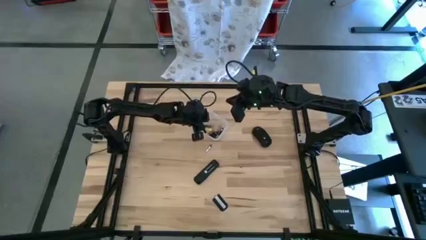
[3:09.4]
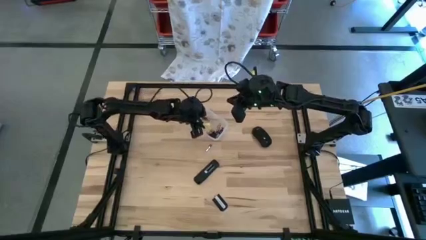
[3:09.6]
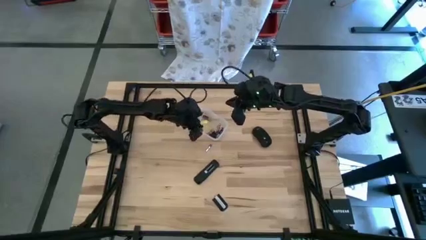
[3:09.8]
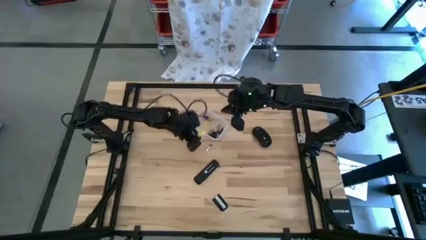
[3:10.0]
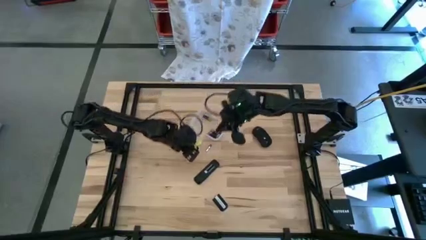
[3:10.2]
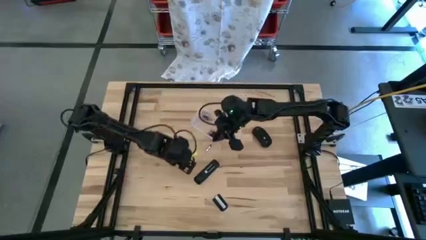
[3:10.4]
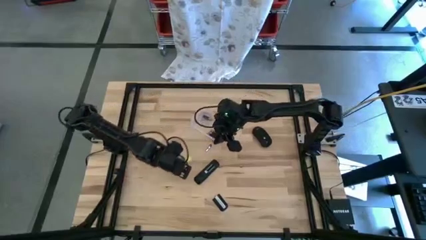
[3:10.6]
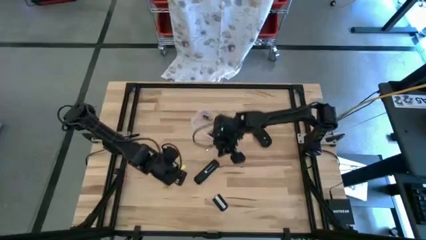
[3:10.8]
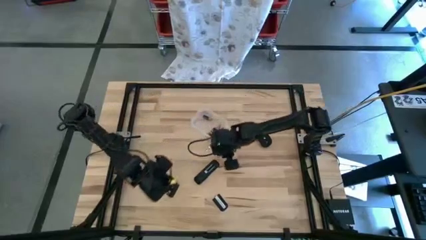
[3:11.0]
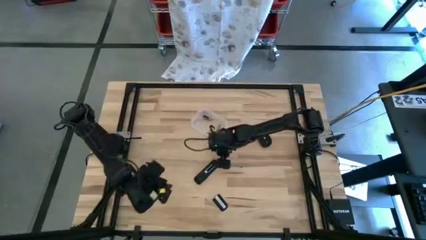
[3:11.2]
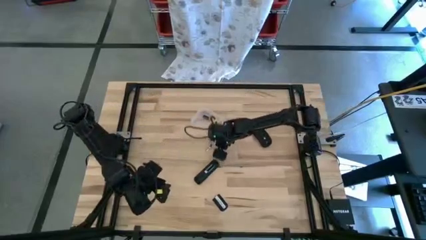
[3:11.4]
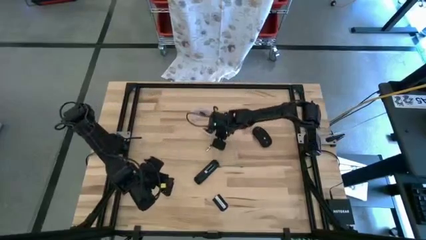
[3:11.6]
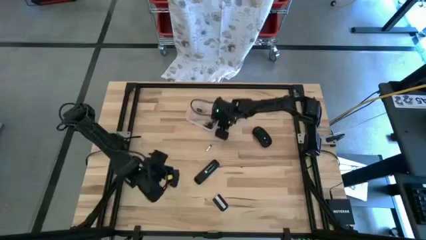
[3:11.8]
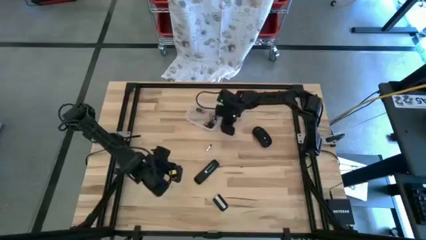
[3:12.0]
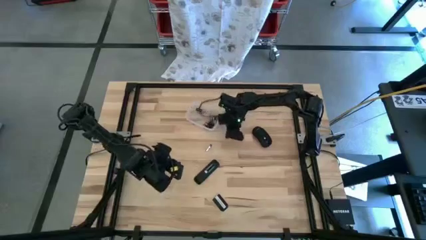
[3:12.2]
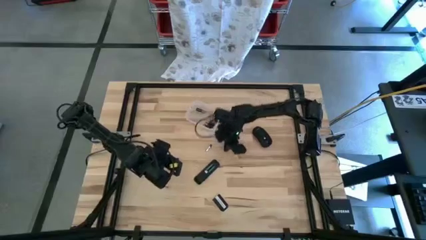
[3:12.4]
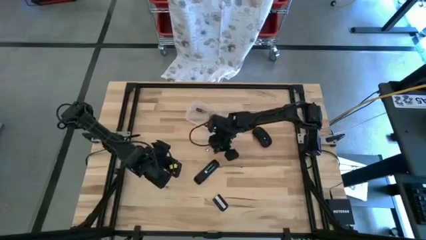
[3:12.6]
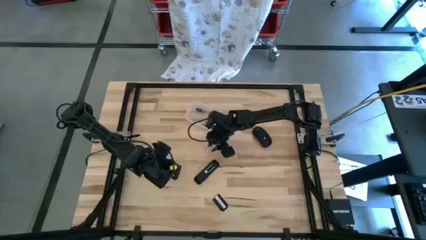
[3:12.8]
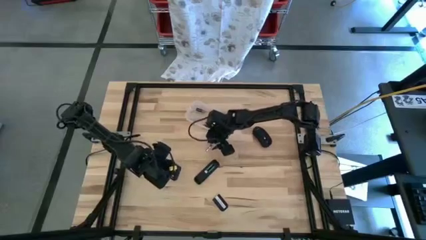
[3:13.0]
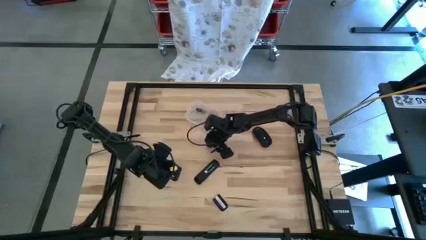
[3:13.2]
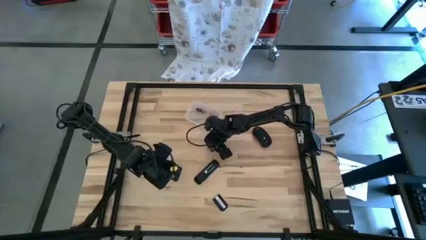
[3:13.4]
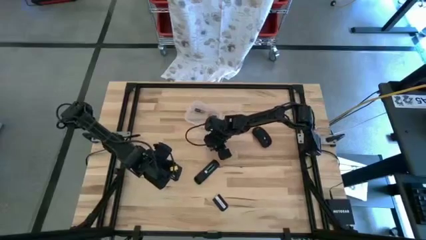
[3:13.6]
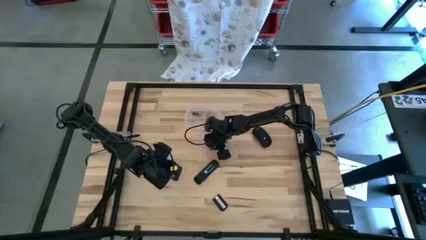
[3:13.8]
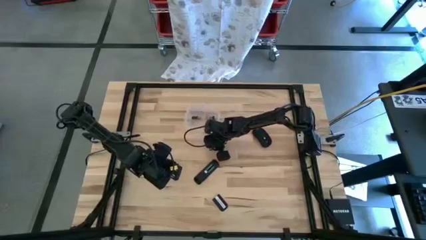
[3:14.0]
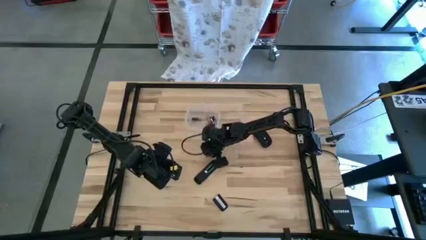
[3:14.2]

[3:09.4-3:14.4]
Task: Insert battery
Insert the small silver battery into the remote

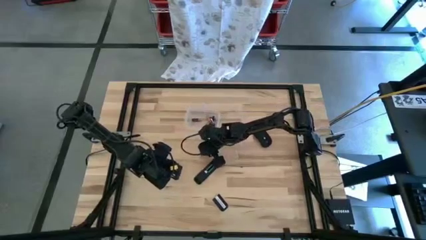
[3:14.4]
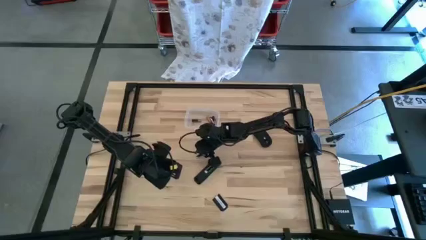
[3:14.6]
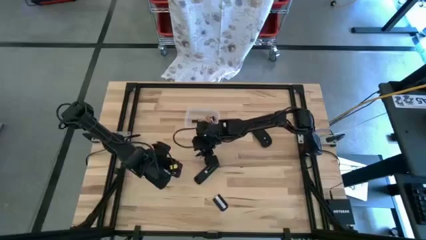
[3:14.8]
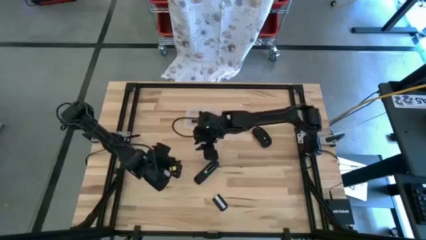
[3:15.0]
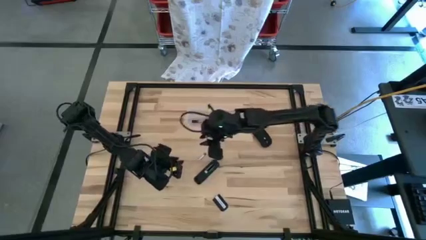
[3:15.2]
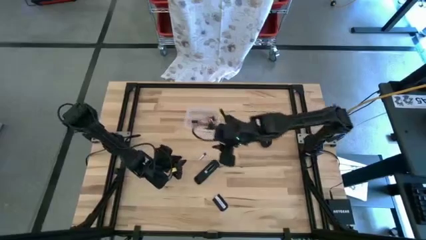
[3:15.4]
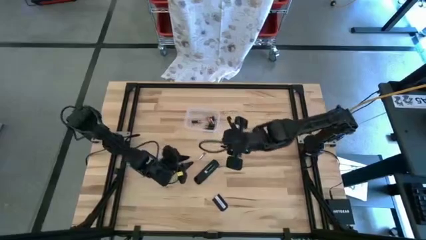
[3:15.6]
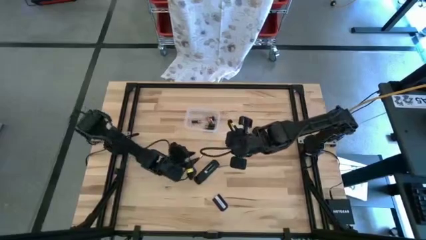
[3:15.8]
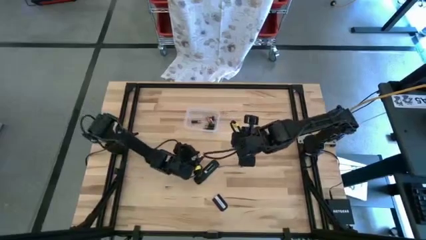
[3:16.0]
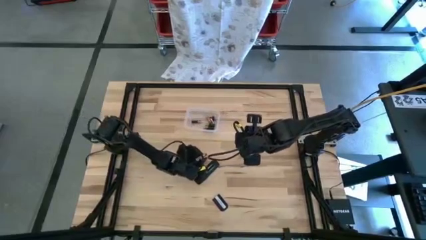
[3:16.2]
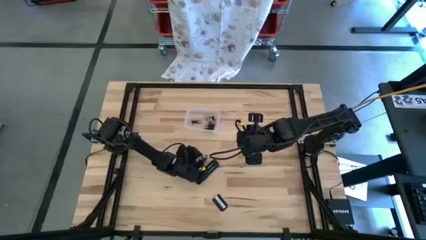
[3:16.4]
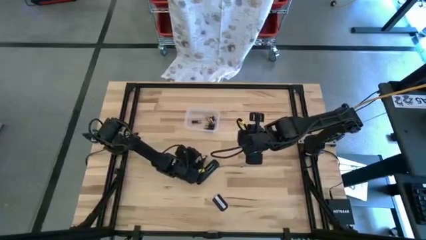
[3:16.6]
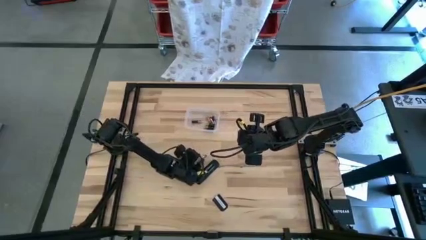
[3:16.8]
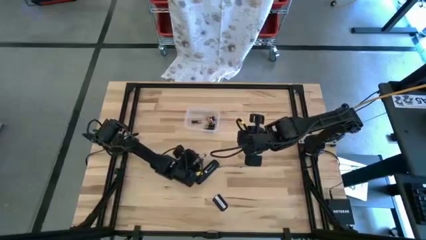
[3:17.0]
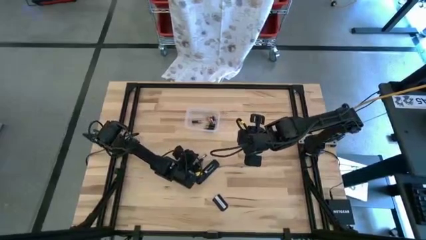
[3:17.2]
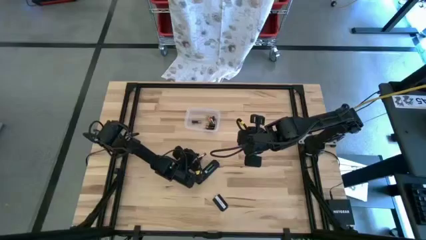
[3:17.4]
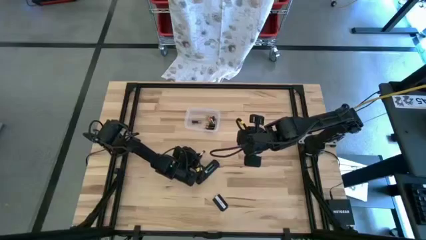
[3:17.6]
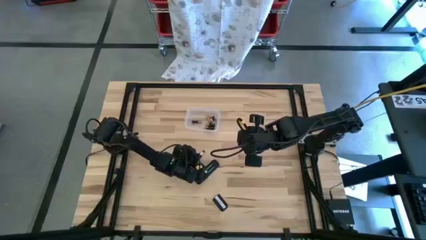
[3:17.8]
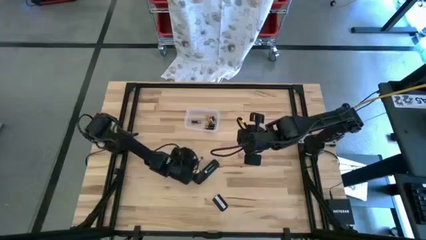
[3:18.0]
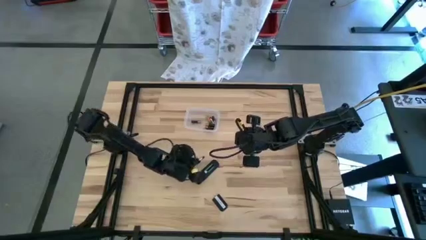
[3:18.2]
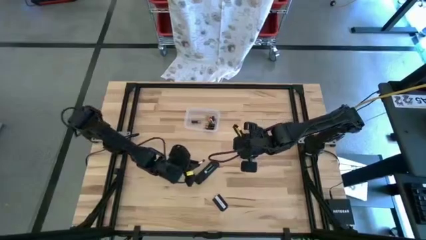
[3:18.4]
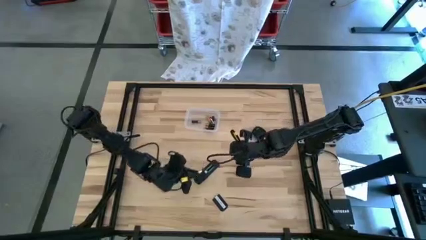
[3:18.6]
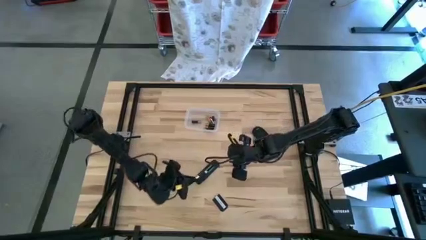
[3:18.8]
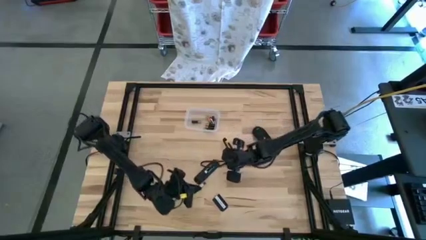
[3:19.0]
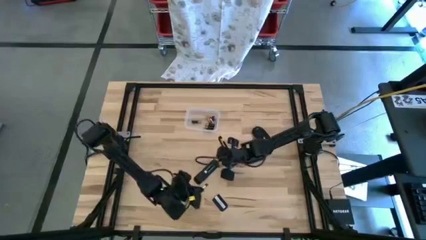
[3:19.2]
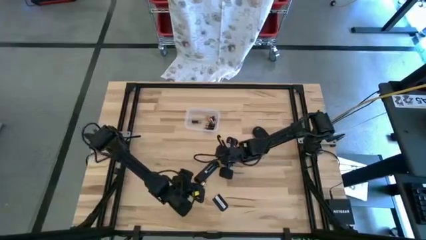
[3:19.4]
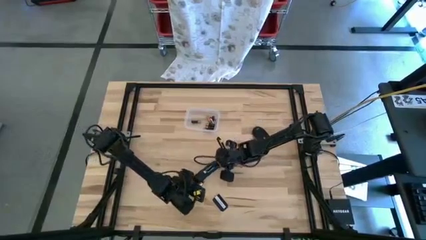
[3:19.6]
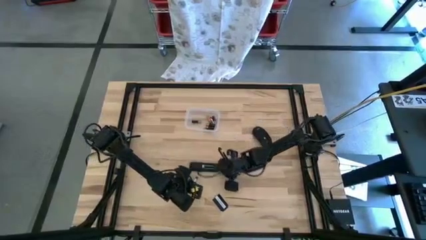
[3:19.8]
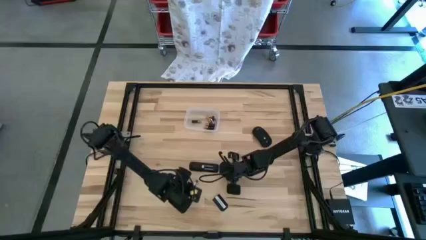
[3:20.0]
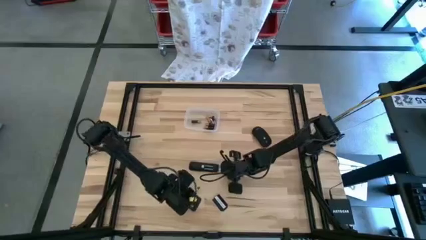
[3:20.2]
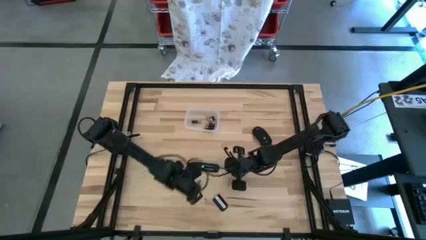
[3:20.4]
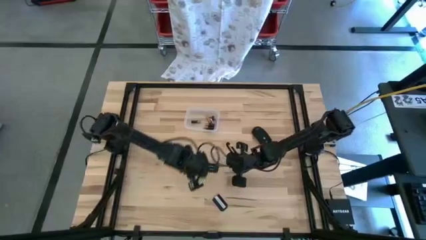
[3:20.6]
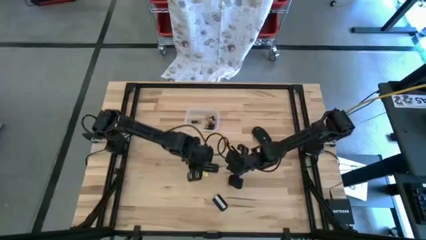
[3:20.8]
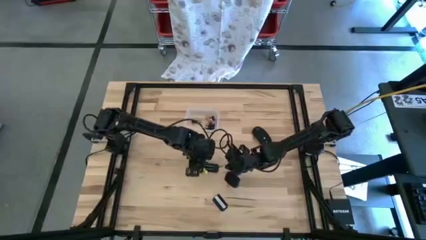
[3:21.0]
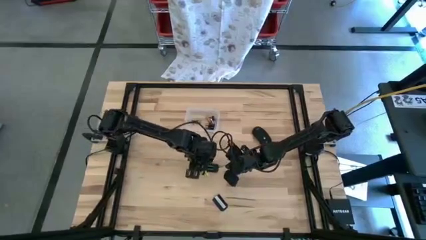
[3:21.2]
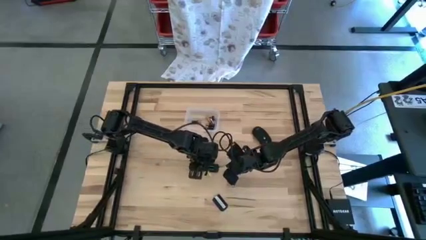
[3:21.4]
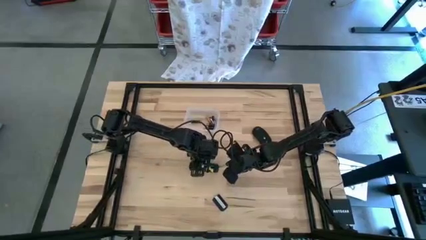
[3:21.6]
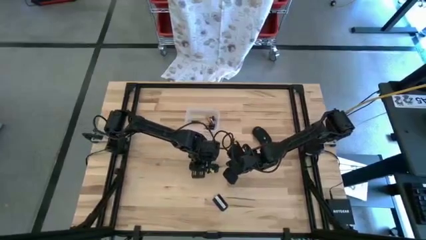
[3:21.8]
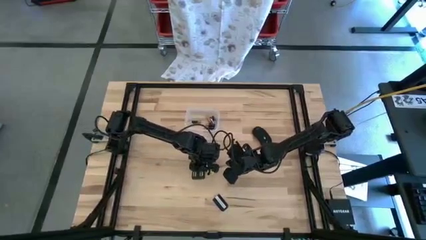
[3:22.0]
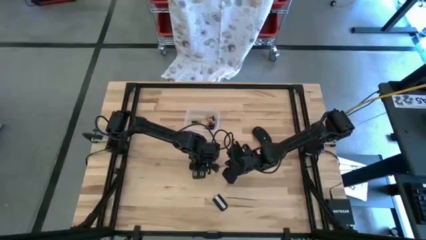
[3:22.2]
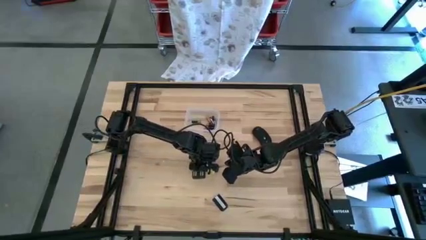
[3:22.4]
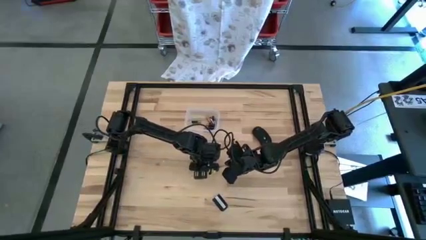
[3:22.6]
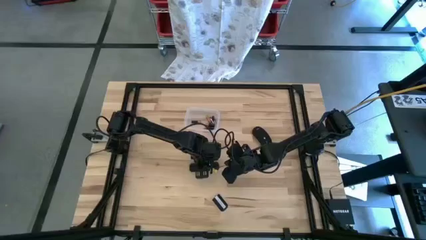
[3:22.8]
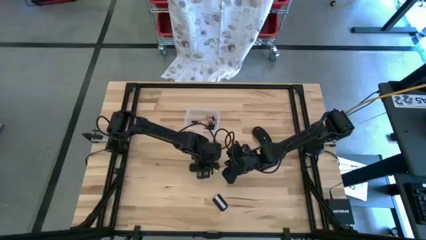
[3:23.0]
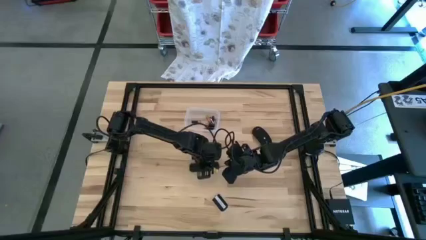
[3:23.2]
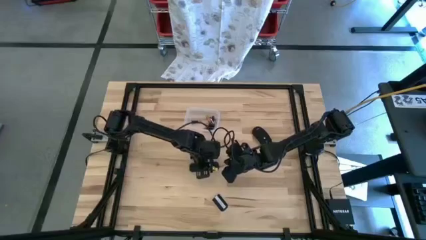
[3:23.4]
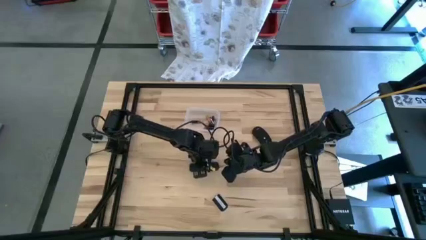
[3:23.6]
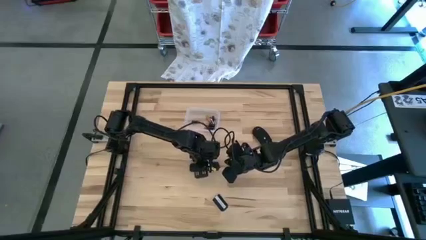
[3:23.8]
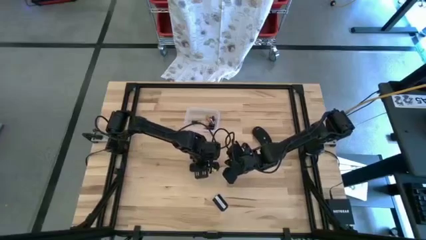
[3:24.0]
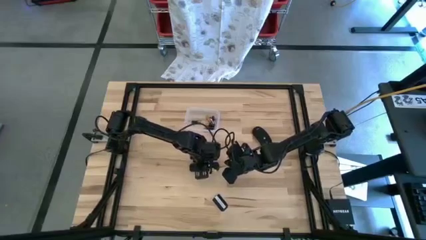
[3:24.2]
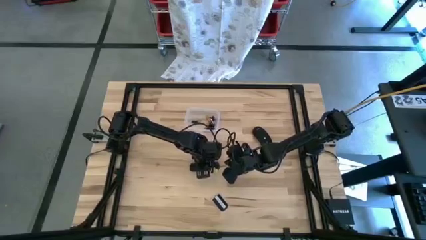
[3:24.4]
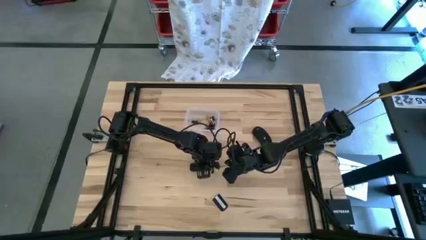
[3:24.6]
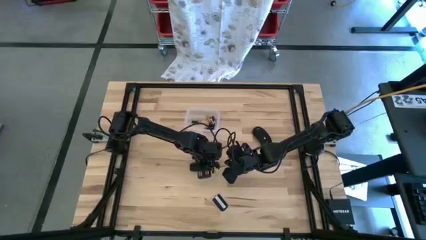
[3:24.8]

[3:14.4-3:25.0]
Insert the silver battery into the remote
